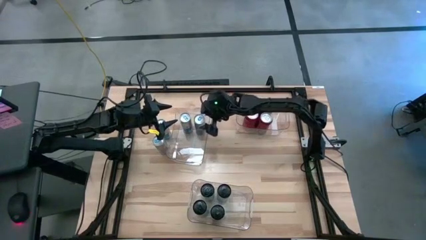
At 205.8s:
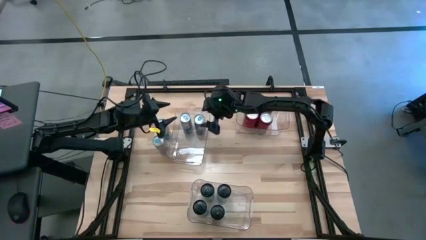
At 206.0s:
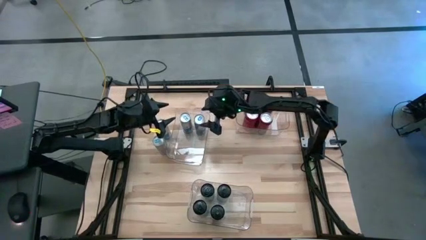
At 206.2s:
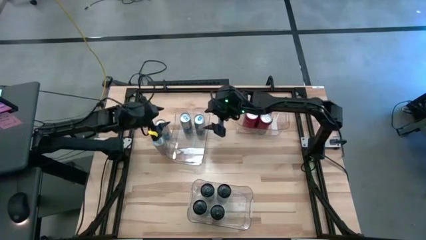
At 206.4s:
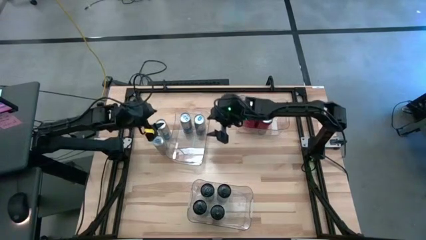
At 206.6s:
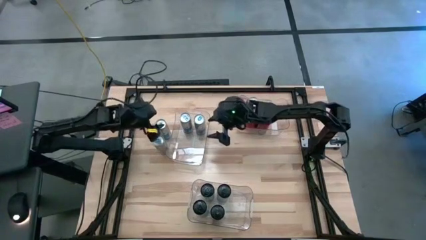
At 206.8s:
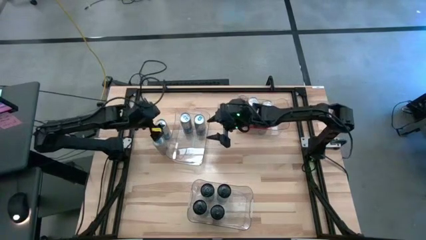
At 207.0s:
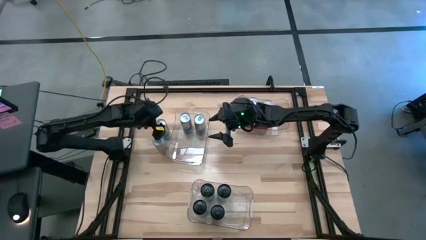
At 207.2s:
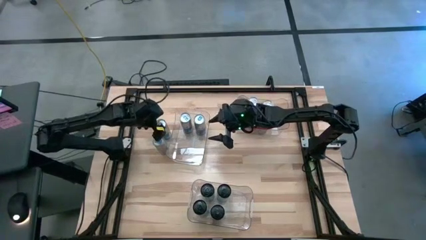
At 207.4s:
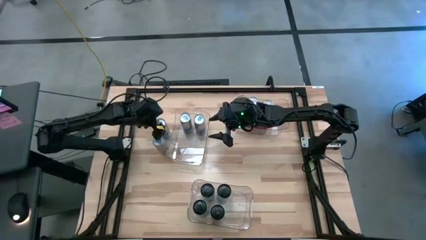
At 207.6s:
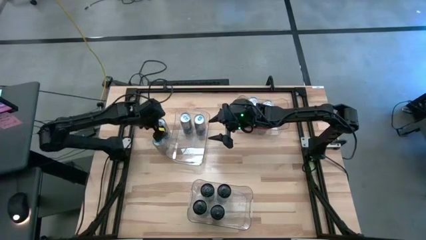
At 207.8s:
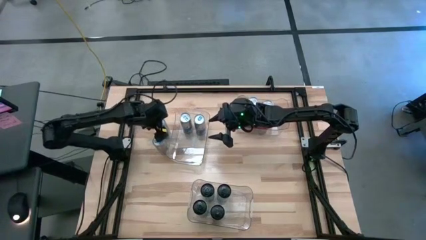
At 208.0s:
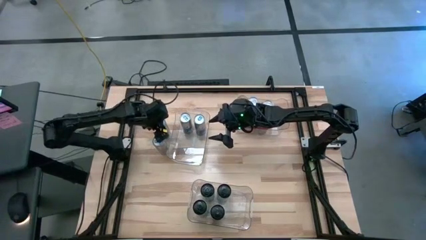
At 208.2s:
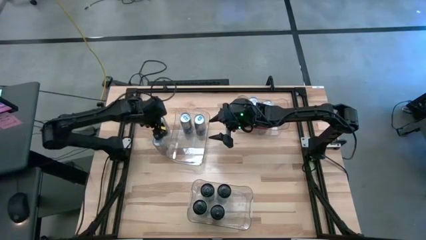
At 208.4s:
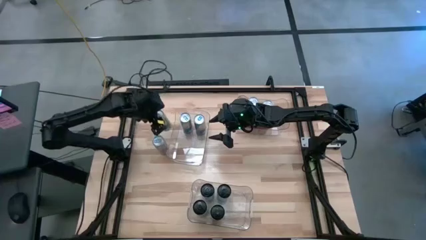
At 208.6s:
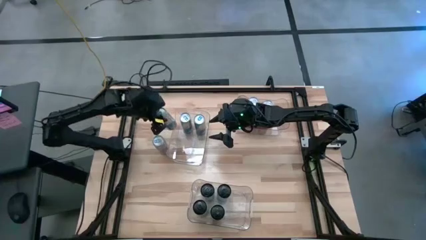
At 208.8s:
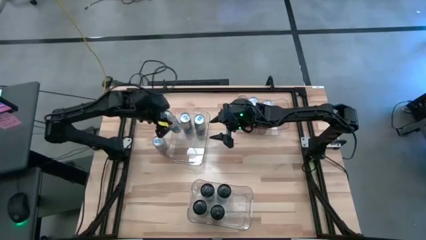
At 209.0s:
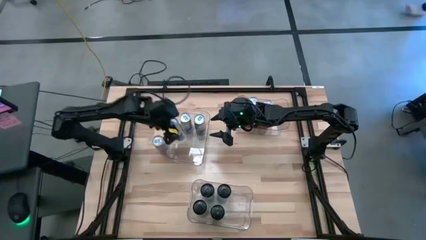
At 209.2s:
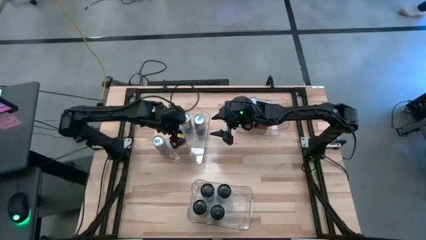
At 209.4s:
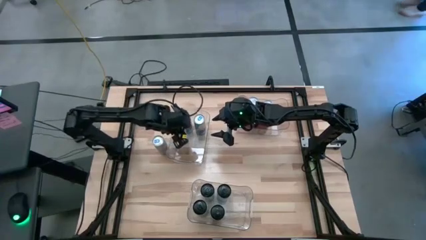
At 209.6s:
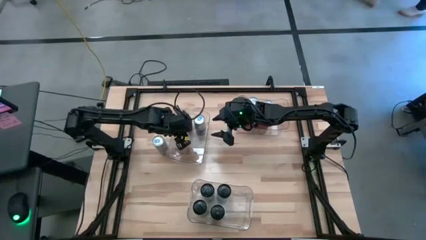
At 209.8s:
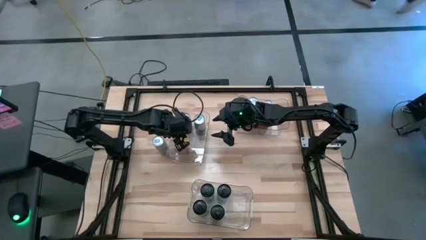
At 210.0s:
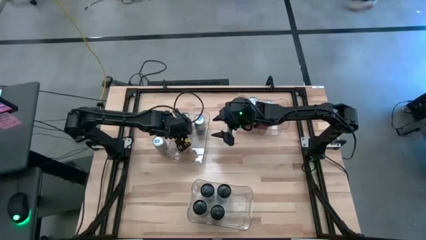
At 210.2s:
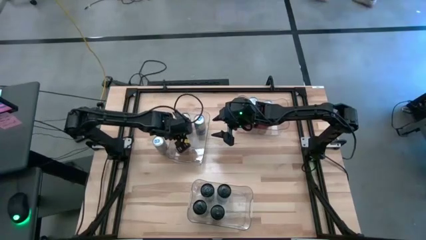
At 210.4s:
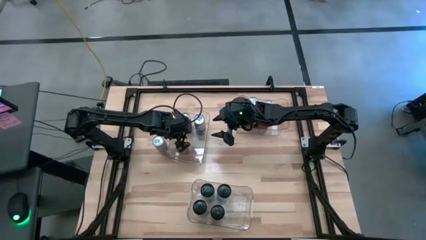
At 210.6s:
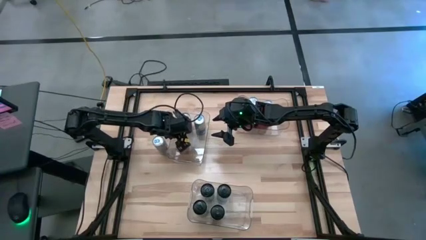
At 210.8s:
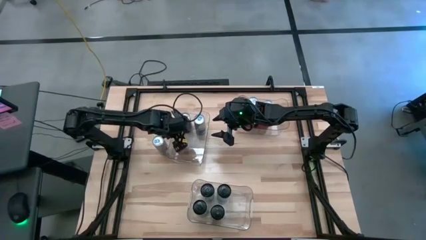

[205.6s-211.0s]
Task: Sort soda cans
Put the blue soda can in the top left transparent bin

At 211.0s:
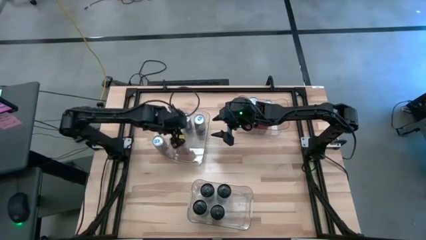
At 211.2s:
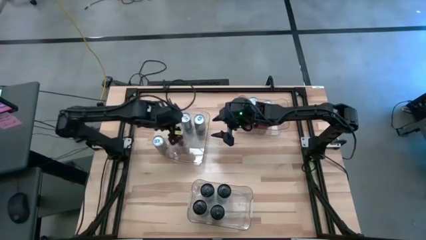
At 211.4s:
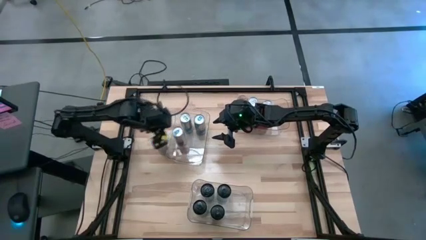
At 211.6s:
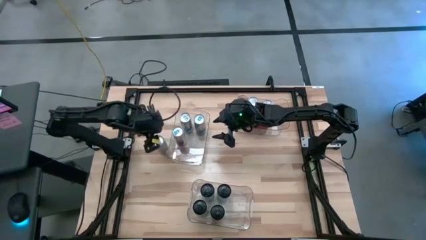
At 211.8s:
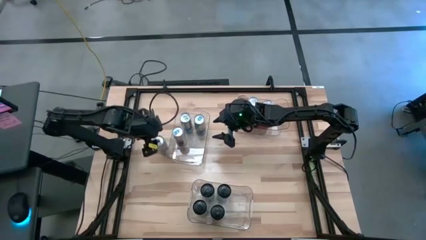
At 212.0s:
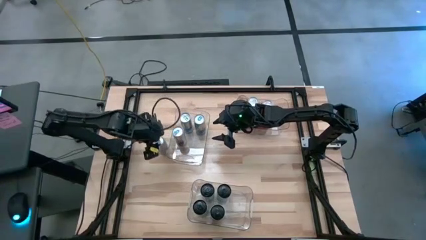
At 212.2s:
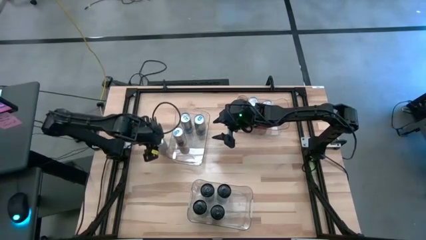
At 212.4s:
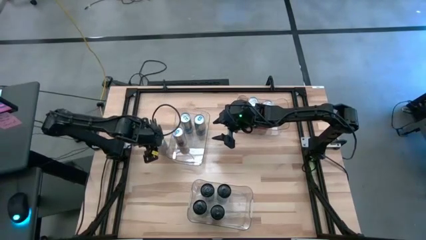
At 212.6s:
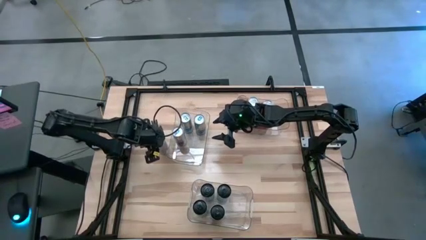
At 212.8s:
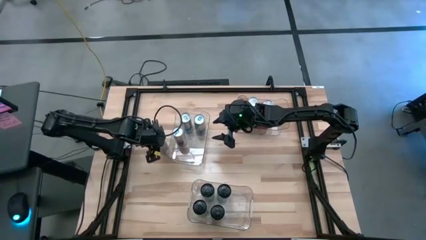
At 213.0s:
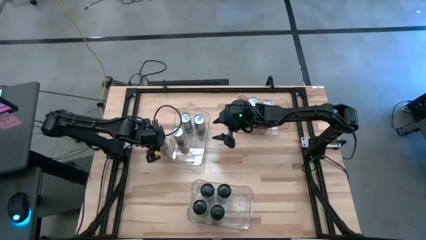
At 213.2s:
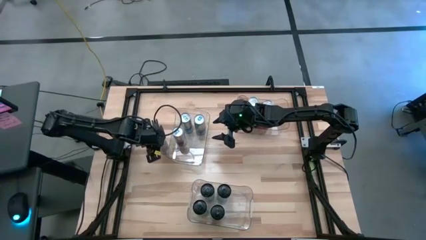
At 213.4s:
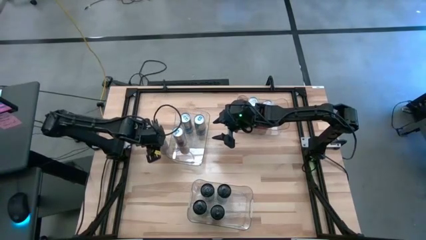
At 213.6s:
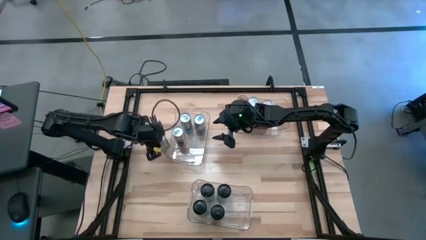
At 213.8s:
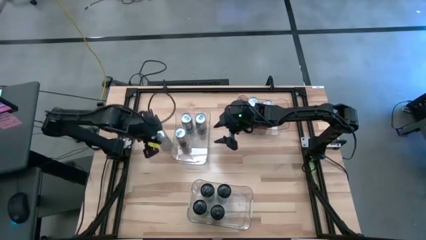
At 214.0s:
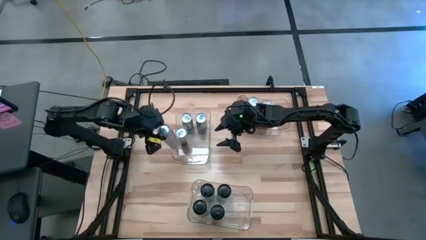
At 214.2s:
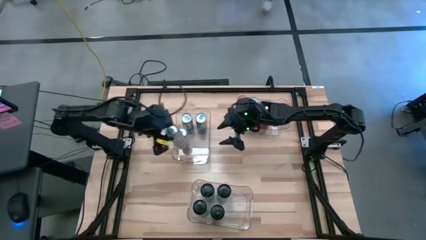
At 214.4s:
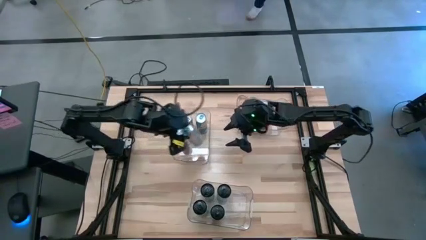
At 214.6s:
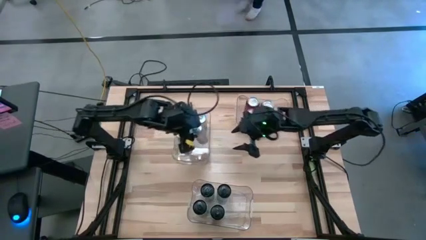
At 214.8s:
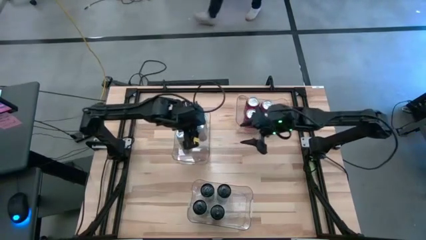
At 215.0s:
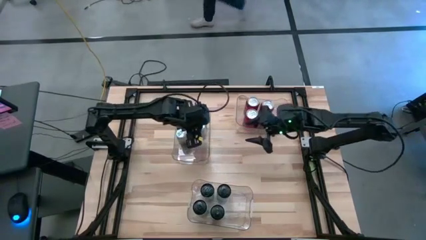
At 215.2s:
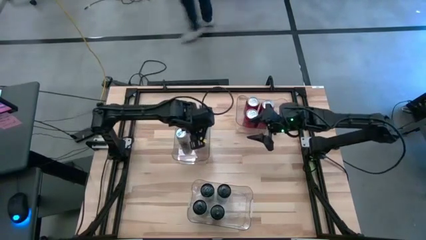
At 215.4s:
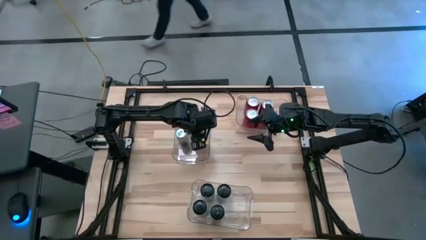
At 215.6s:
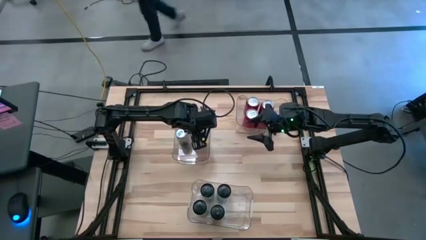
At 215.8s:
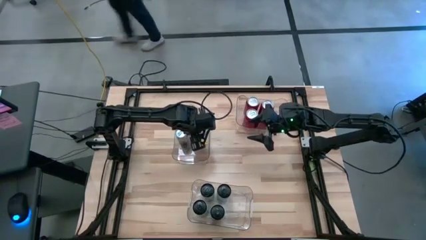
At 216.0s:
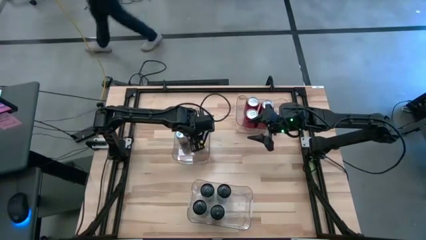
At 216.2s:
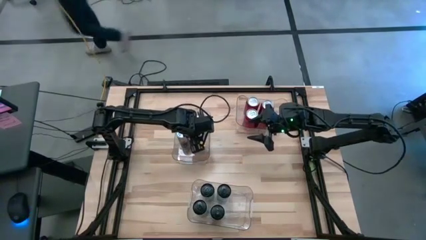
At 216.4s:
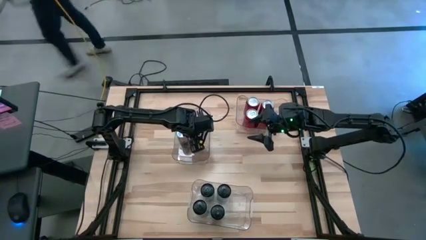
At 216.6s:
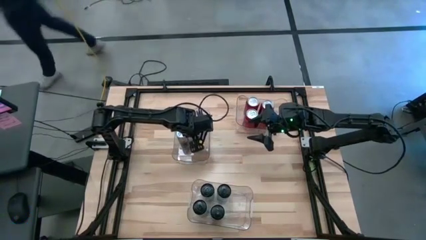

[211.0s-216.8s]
Put the blue soda can in the top left transparent bin

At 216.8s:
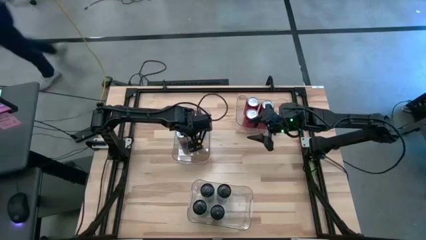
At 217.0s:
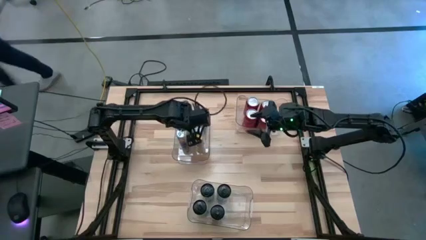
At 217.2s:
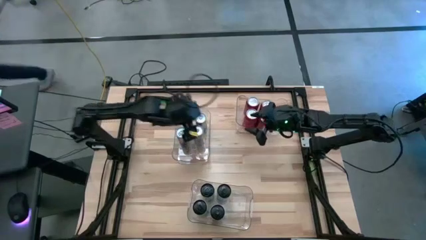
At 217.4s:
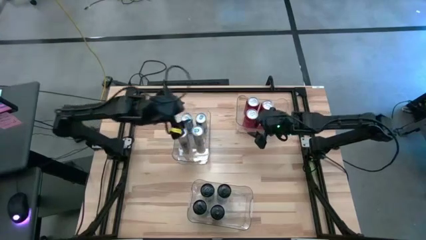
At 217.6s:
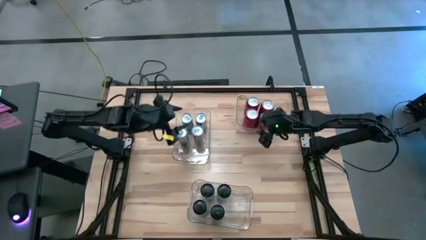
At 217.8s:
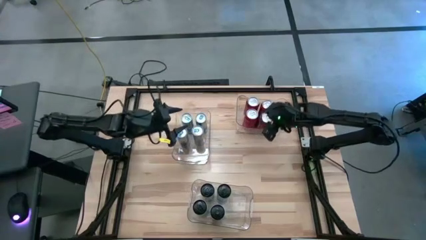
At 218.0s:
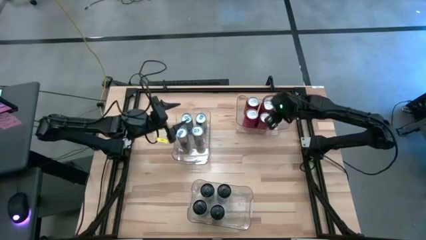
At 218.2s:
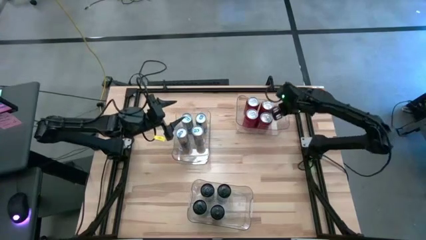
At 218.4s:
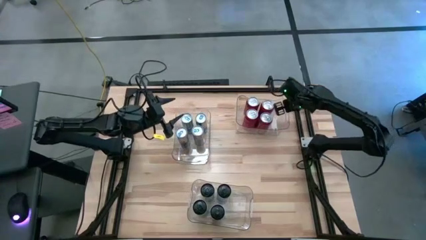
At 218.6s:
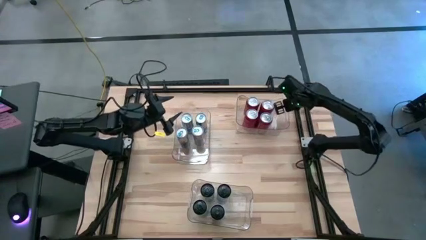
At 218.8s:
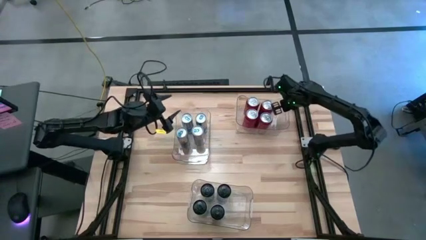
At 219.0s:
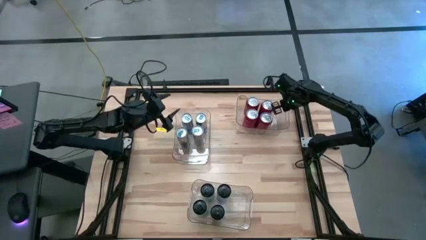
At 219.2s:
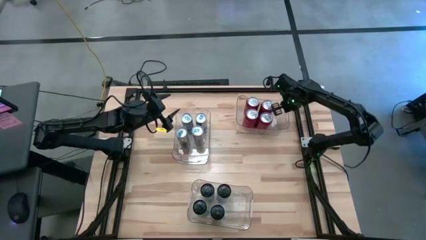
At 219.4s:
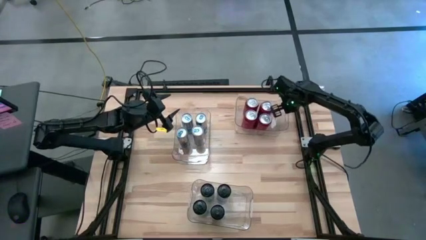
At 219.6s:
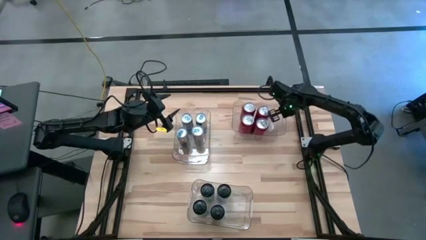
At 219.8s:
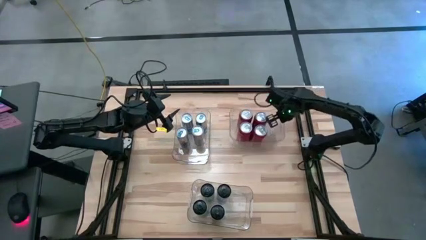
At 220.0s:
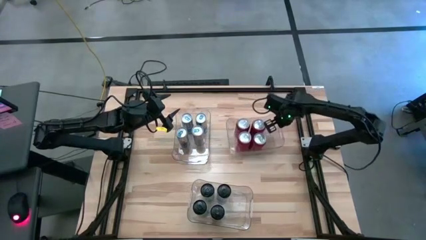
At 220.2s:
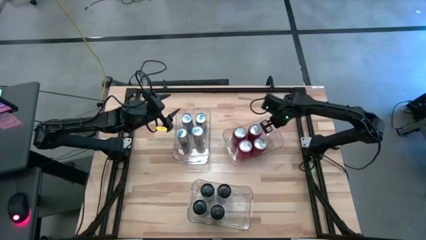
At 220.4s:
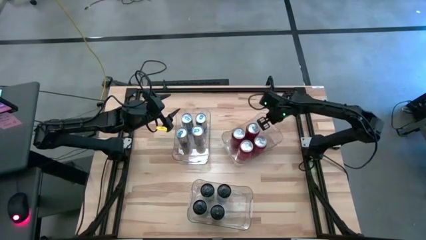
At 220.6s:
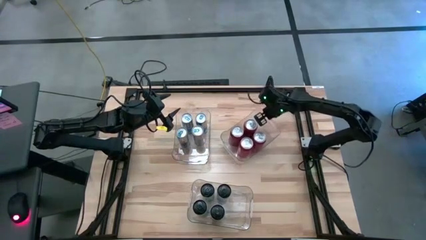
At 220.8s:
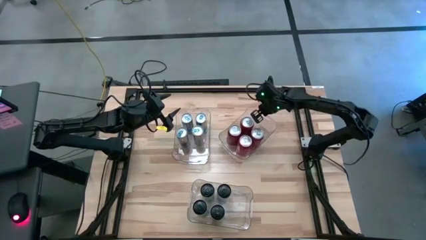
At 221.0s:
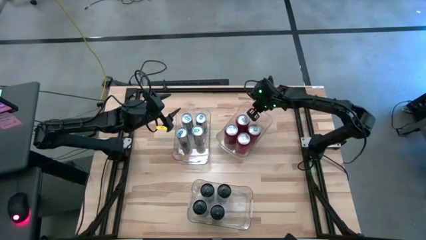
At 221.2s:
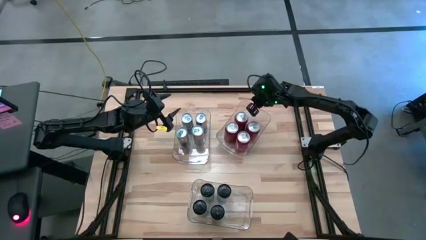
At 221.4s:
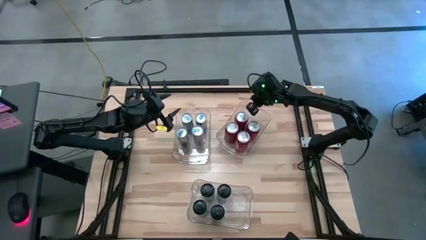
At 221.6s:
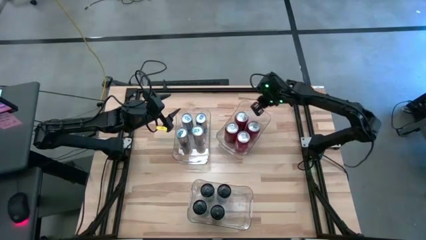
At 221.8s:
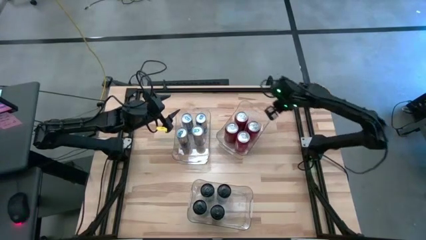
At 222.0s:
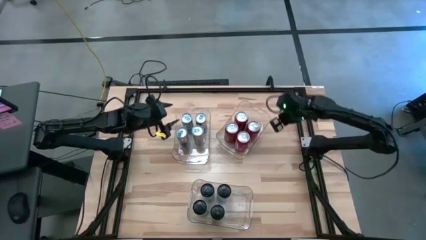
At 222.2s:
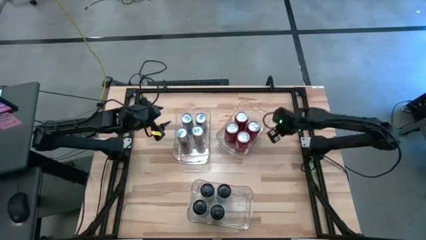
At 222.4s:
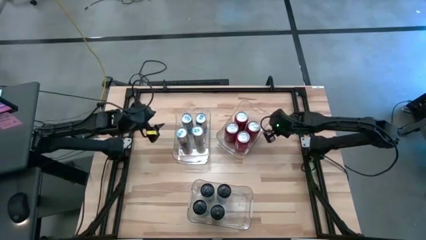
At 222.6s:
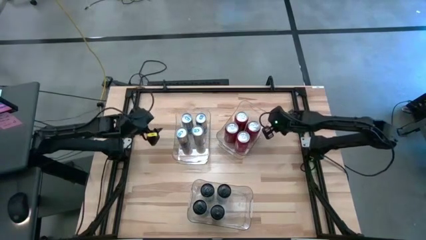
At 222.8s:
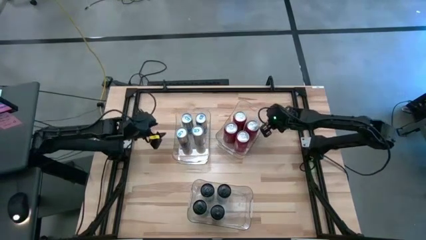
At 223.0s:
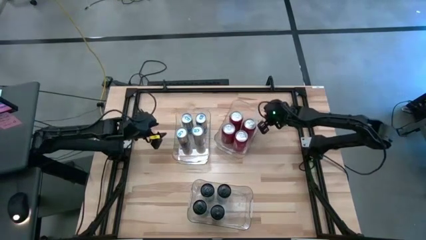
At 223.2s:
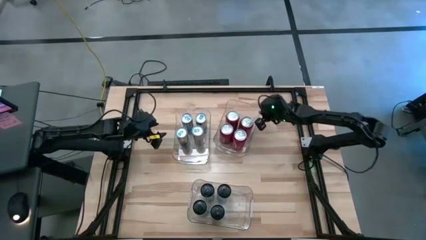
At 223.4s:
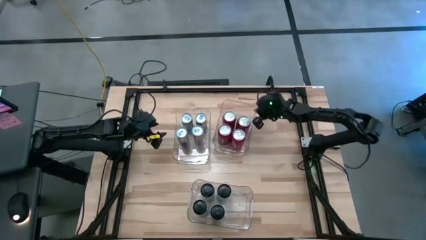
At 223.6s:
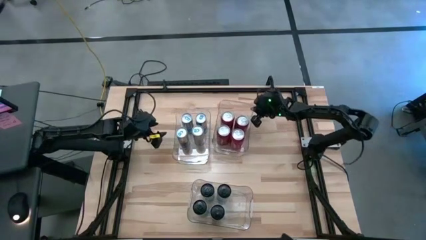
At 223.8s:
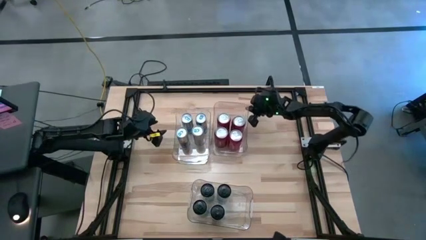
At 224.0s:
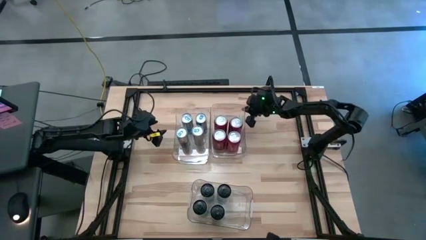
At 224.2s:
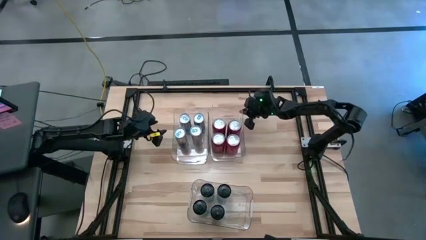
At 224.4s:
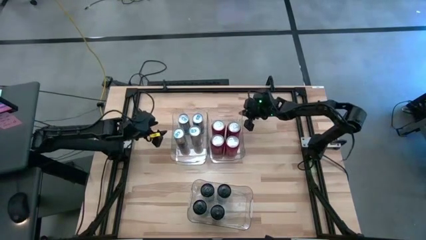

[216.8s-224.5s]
Move the top right transparent bin to the center of the table
